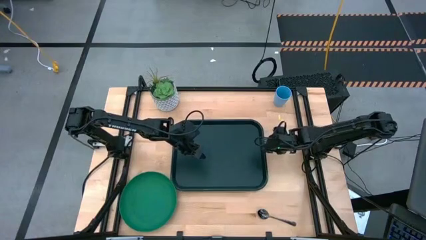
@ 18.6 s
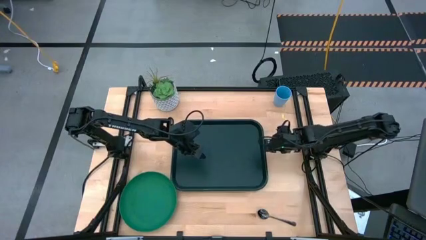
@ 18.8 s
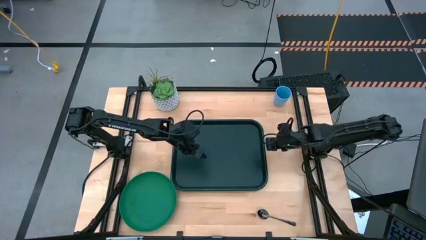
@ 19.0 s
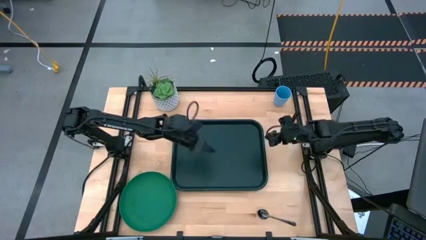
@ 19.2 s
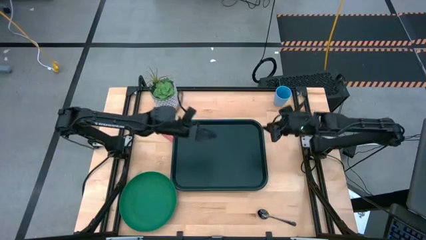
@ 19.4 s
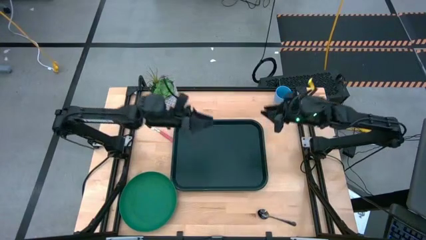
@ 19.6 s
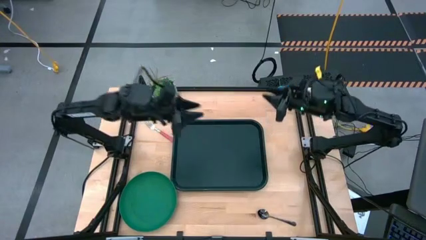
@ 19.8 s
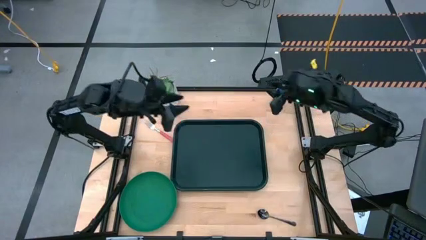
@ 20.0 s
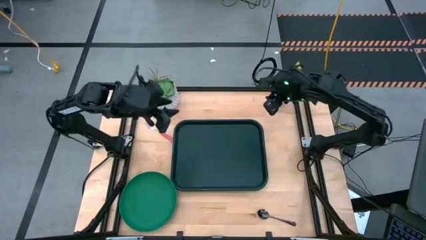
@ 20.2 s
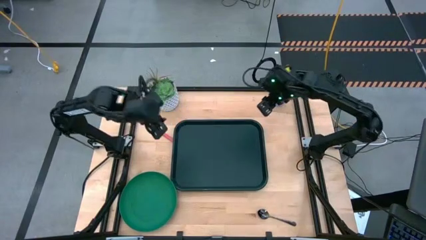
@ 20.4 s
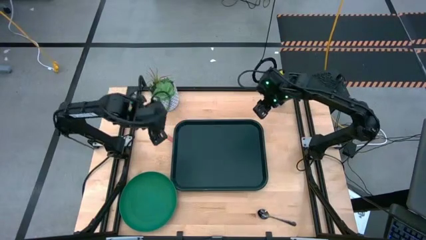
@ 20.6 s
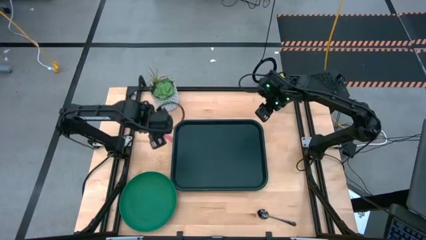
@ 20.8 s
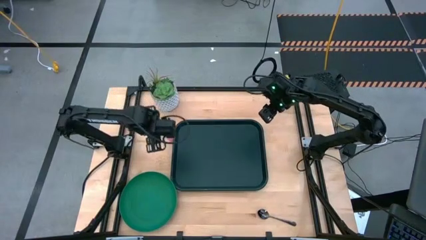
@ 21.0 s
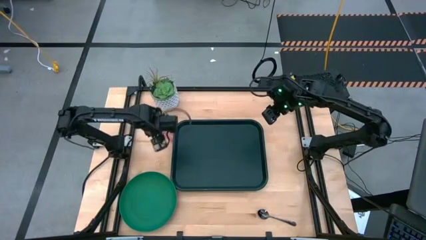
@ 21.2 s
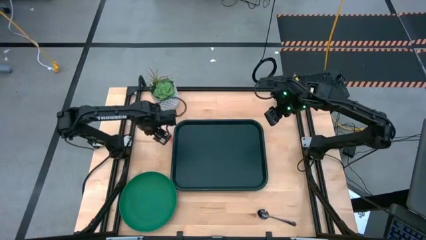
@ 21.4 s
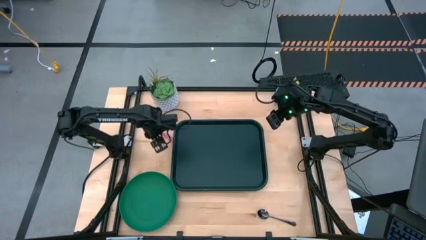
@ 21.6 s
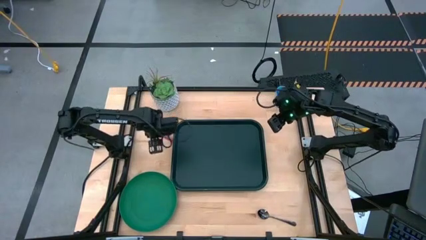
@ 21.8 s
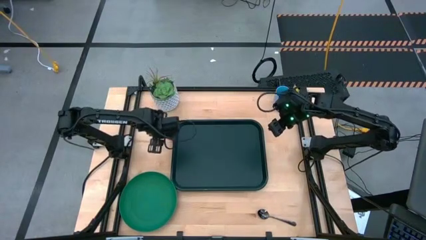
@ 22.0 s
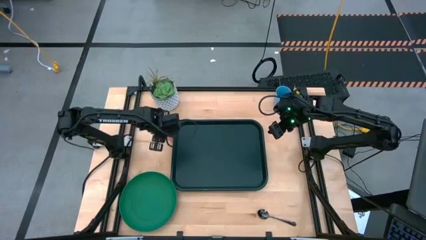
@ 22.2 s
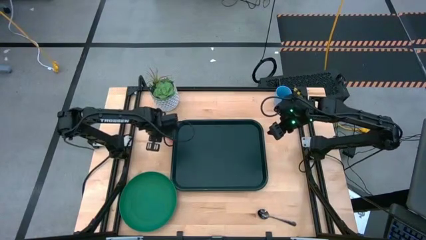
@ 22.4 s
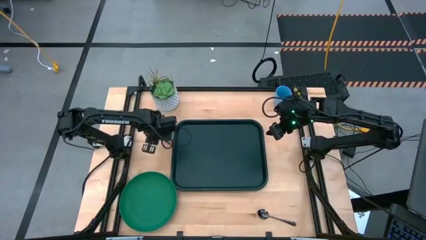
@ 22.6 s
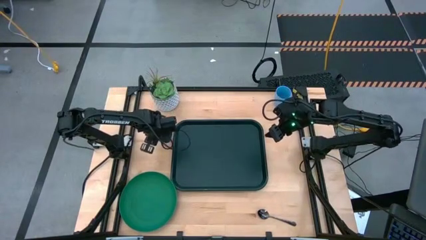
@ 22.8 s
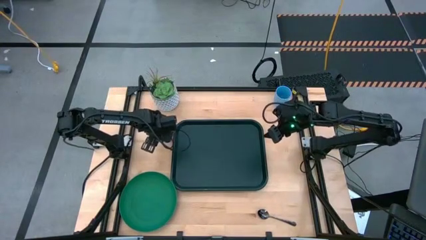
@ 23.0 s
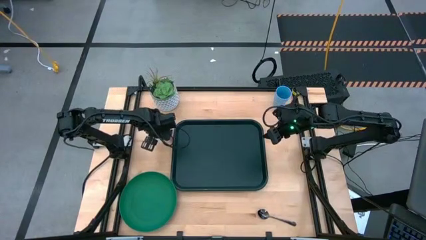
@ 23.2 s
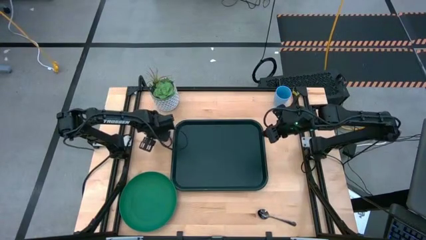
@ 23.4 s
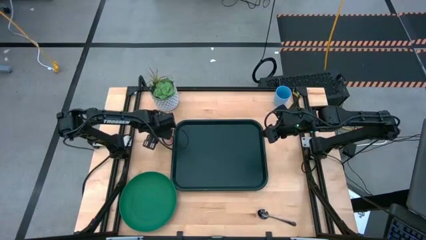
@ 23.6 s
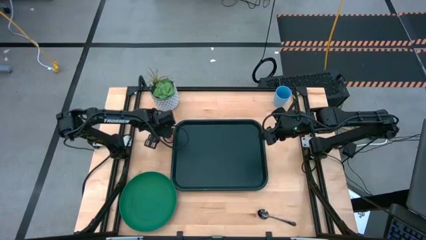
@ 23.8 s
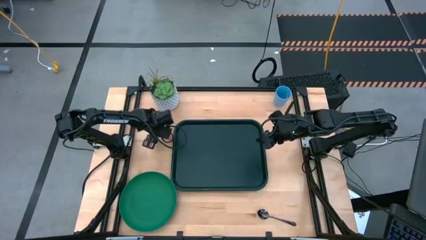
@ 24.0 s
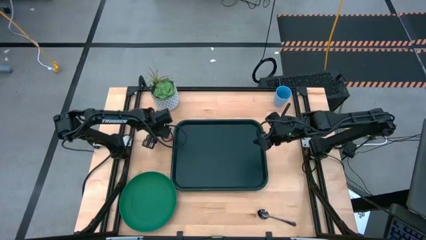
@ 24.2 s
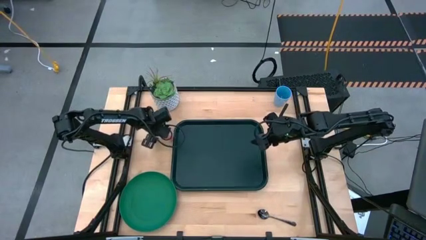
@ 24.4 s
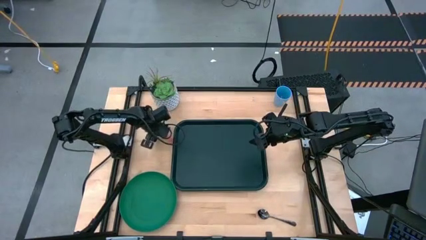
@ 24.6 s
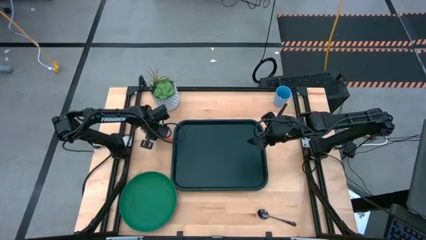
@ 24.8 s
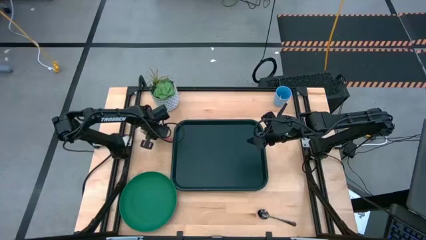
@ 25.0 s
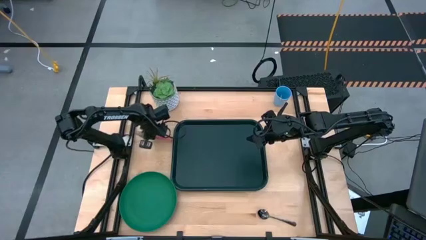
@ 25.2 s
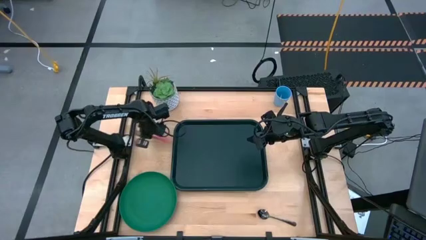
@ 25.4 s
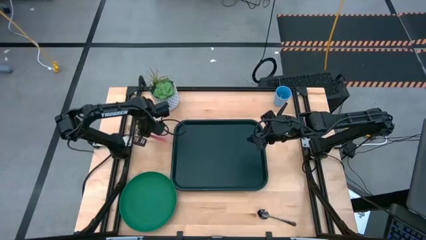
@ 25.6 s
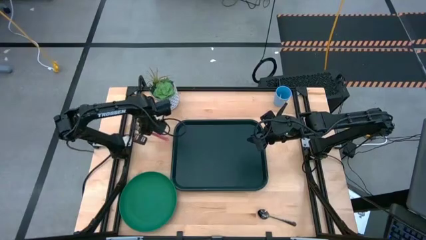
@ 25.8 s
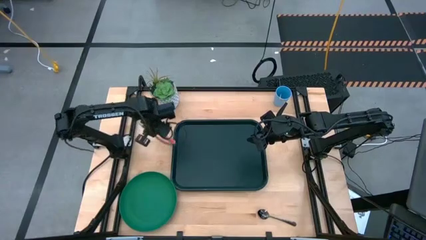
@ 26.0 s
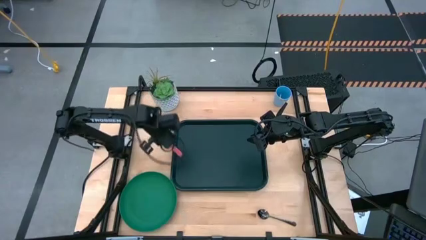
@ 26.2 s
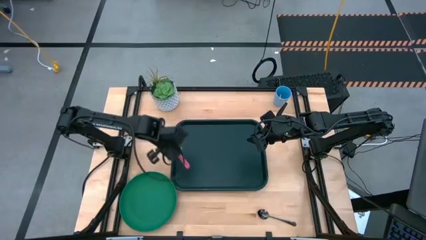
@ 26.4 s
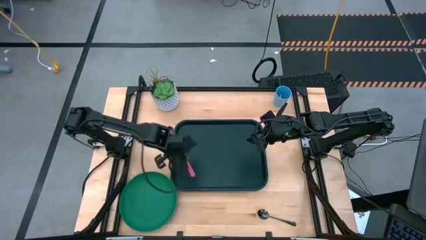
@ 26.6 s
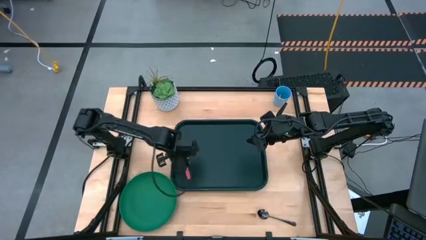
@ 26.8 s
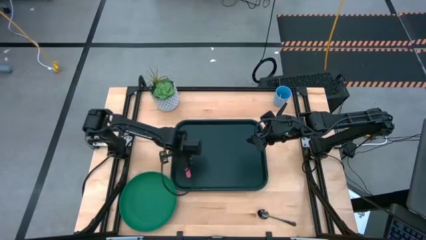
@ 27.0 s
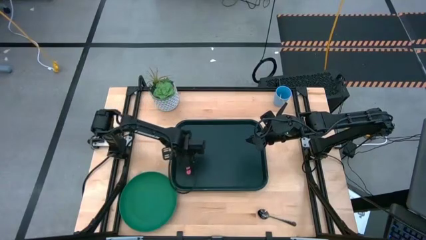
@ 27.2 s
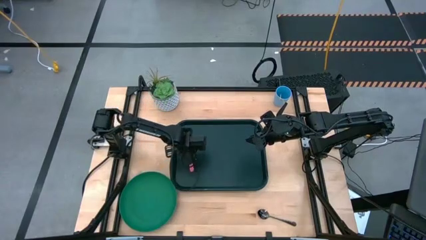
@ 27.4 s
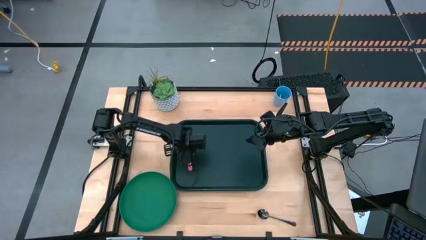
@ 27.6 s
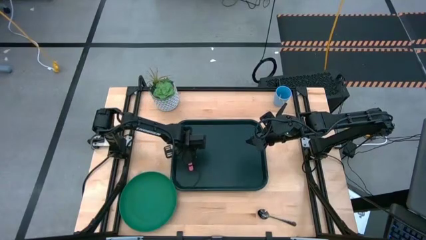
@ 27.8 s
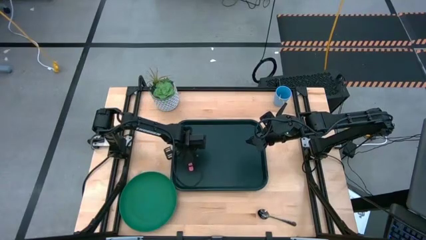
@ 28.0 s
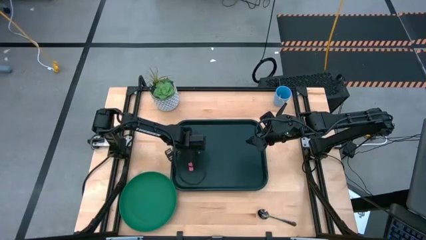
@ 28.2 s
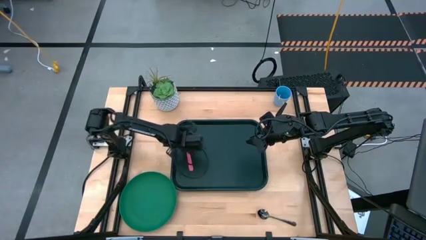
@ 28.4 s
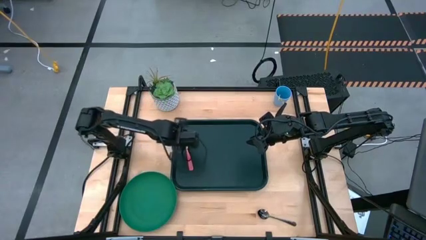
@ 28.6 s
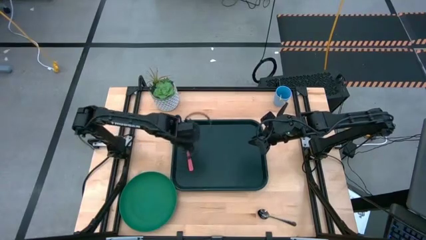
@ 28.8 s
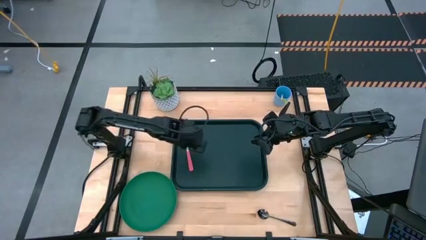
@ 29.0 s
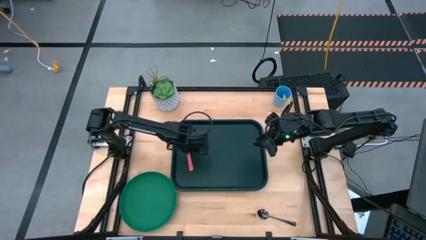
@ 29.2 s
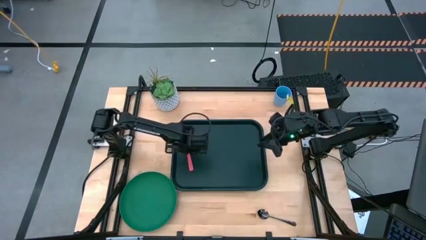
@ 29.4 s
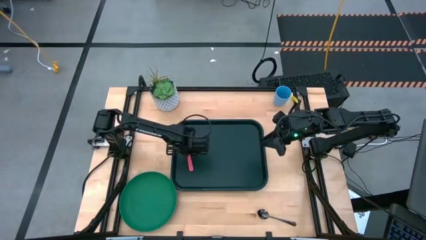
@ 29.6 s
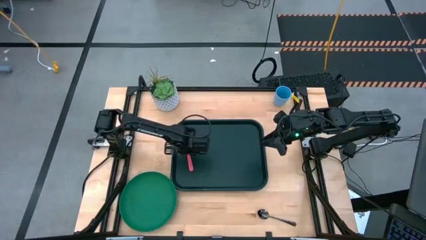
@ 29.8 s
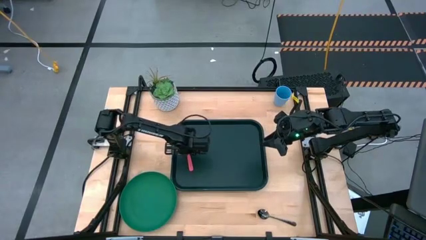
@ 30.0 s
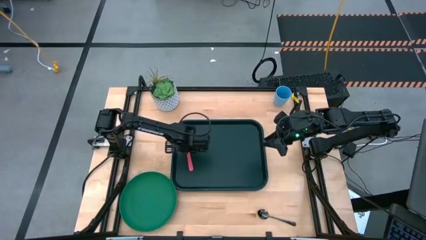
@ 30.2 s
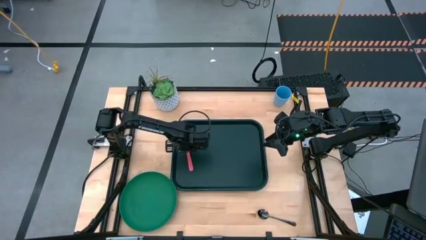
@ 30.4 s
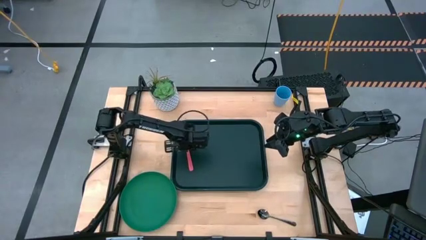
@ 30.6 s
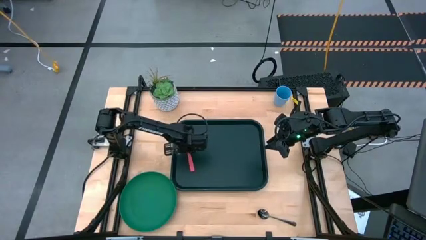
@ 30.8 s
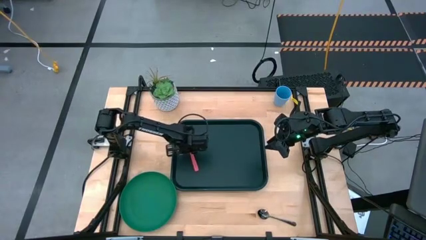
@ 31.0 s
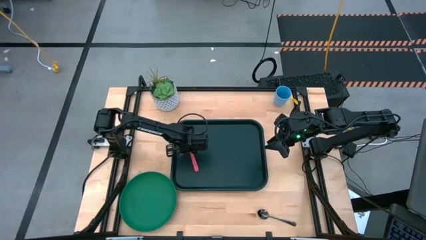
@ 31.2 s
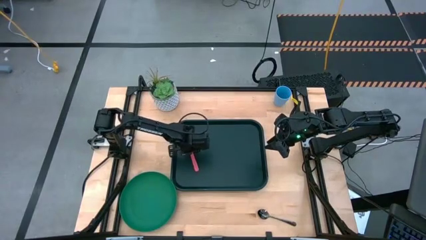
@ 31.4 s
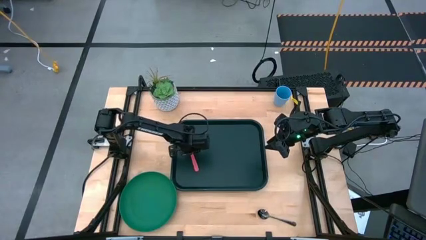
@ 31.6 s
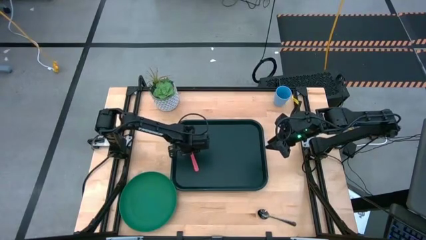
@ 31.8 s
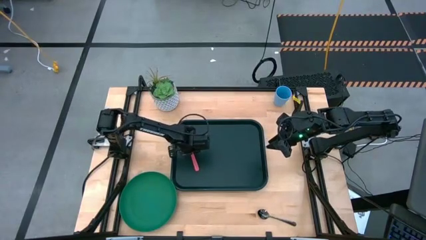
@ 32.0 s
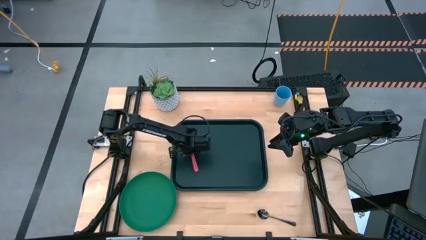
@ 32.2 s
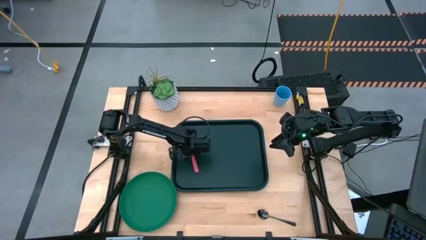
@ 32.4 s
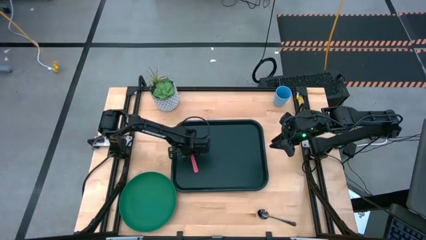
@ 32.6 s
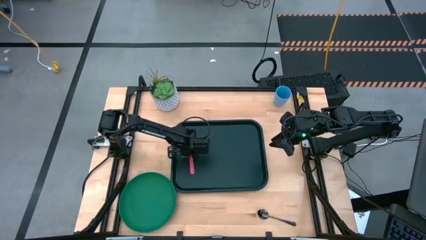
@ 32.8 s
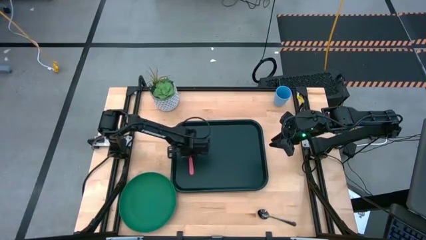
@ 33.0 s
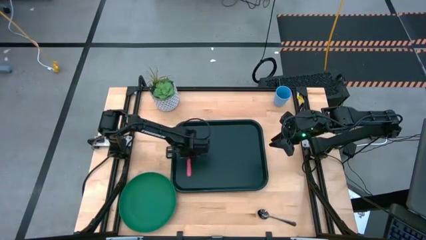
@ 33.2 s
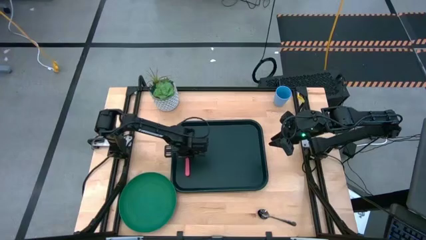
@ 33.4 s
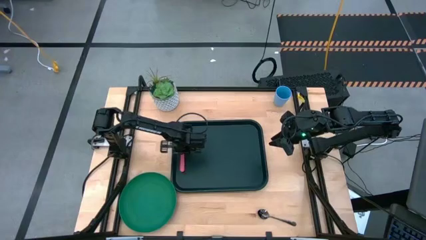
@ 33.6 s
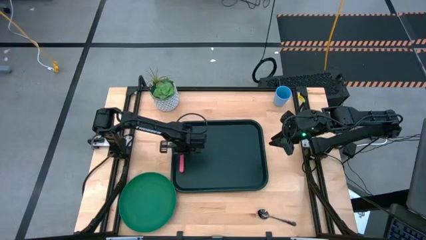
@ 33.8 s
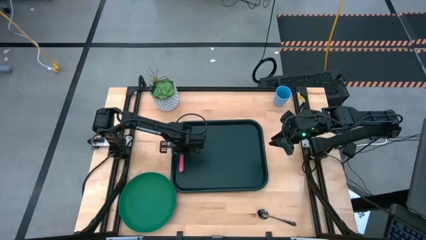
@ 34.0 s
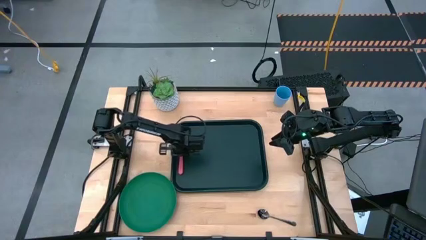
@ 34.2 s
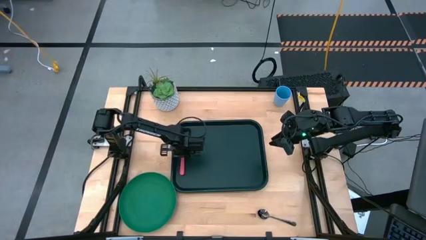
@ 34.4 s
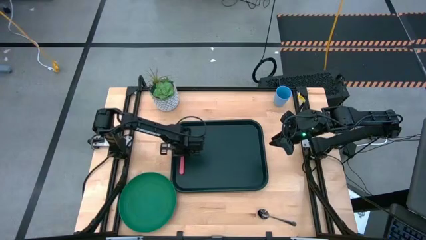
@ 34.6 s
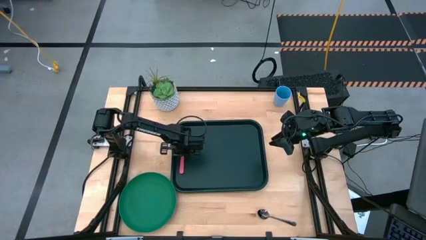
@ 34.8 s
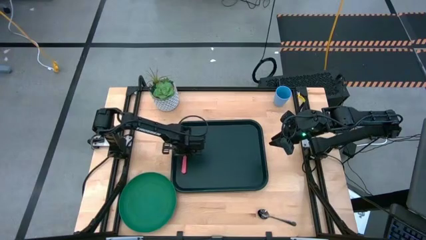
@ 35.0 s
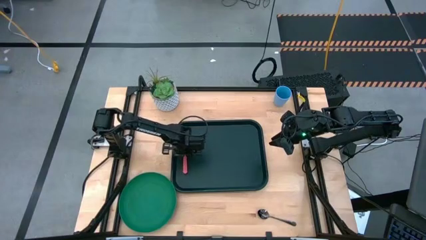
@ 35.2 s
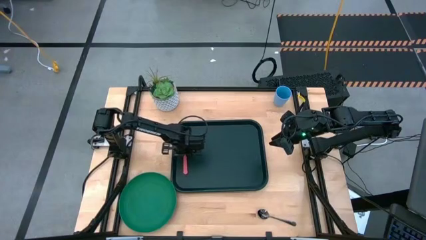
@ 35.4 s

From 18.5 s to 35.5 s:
Task: Pick and place plate/cup/fork/spoon on tray
Put the pink fork to the left of the dark green serving tray
